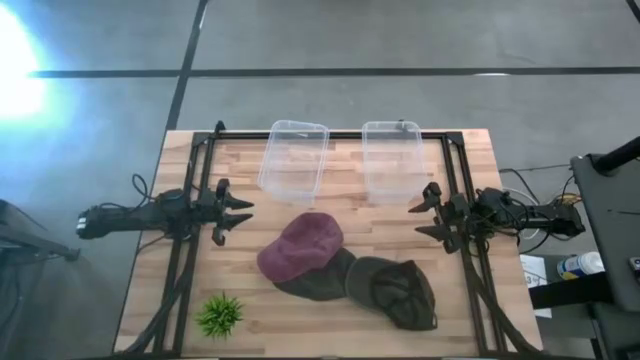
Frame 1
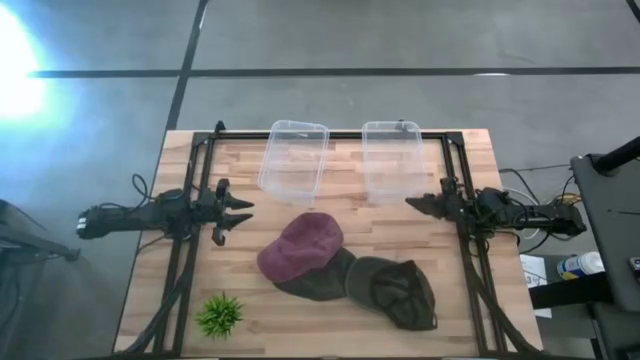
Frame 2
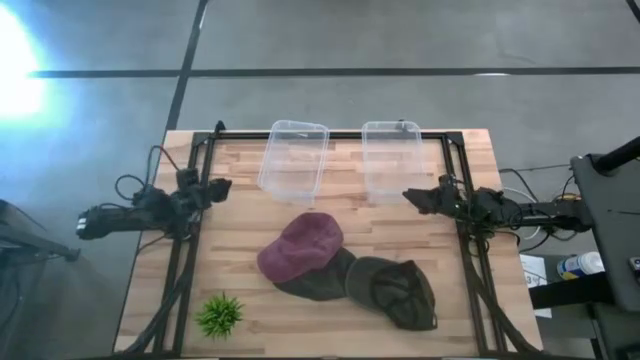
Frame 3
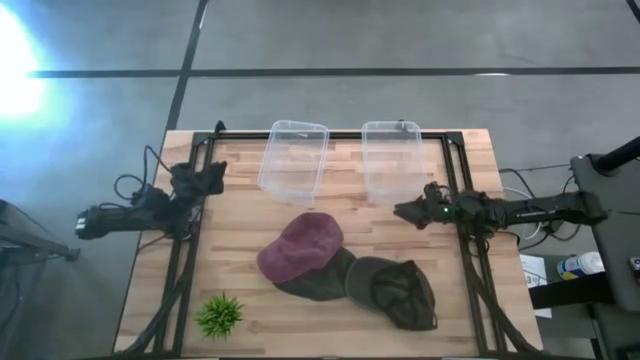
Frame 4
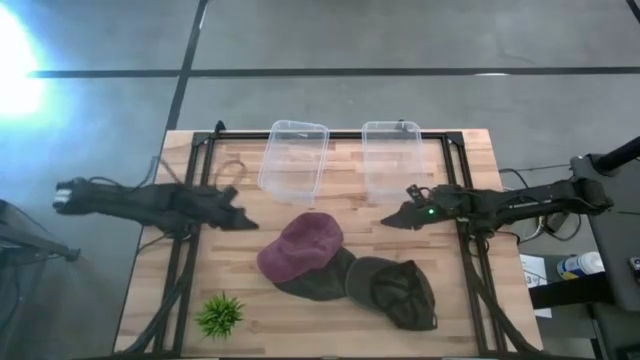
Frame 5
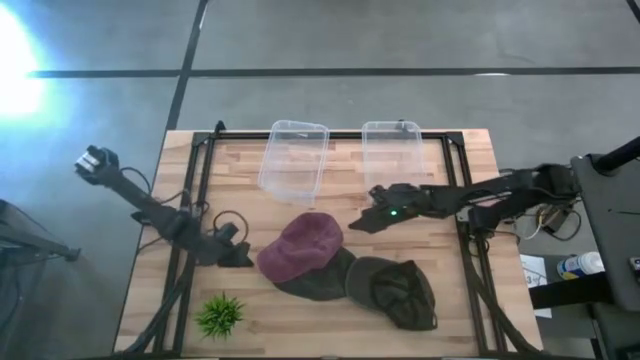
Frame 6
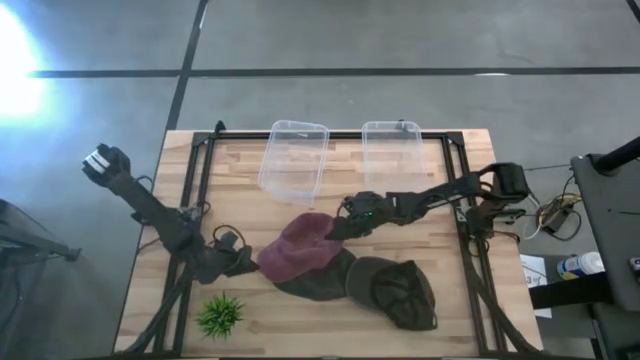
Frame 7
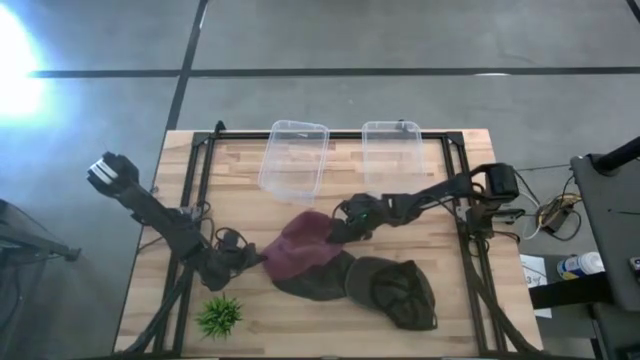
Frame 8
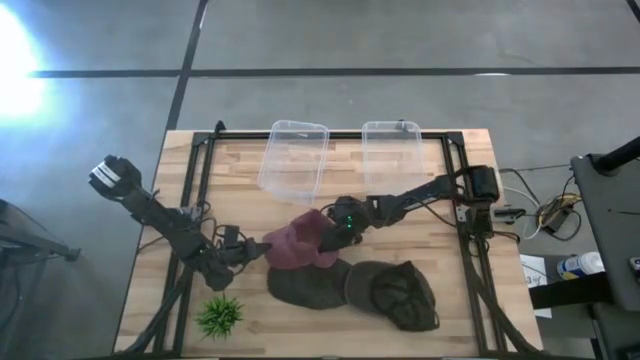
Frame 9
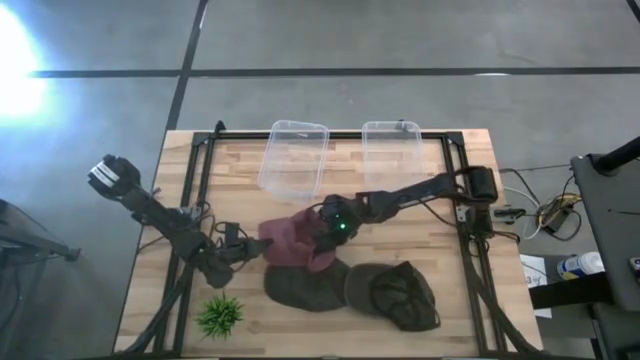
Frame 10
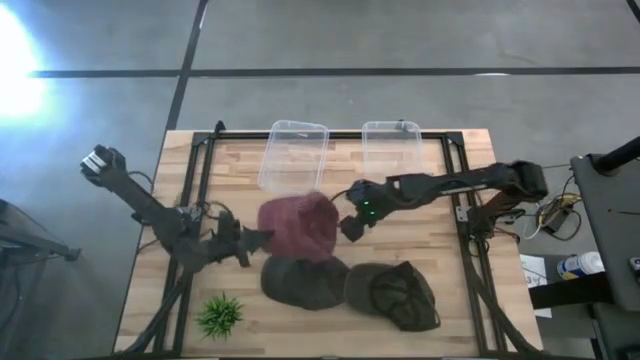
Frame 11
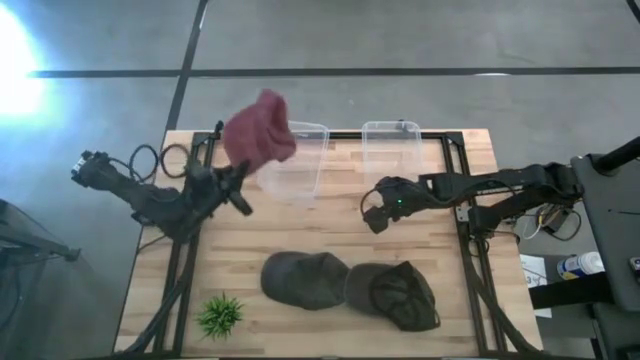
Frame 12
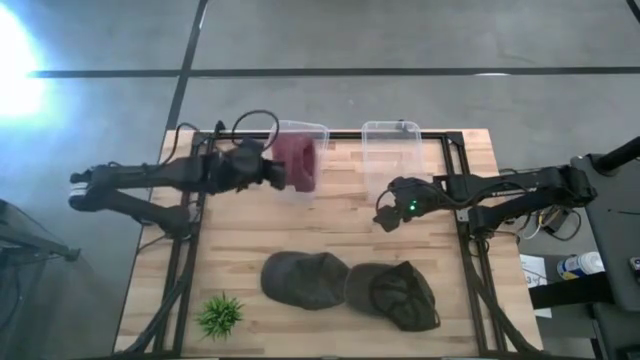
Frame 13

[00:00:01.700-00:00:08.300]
Task: Pick & Place hat
Put the red cap into the left transparent bin

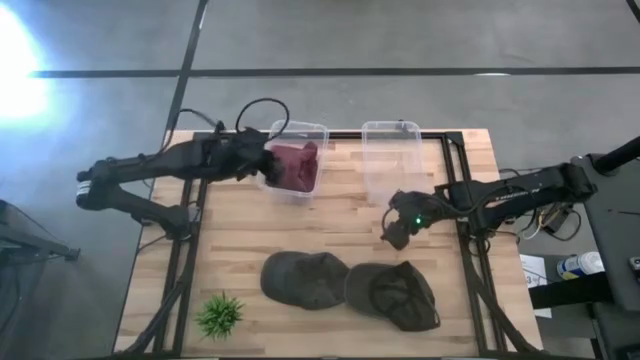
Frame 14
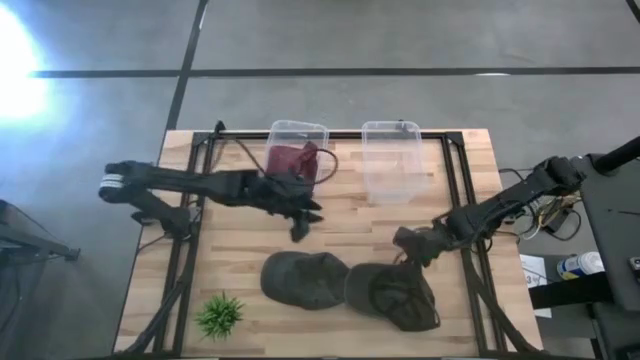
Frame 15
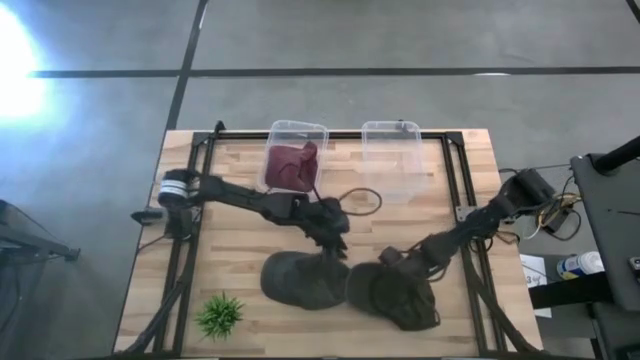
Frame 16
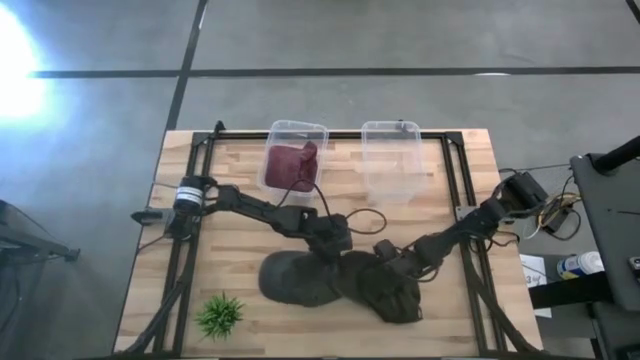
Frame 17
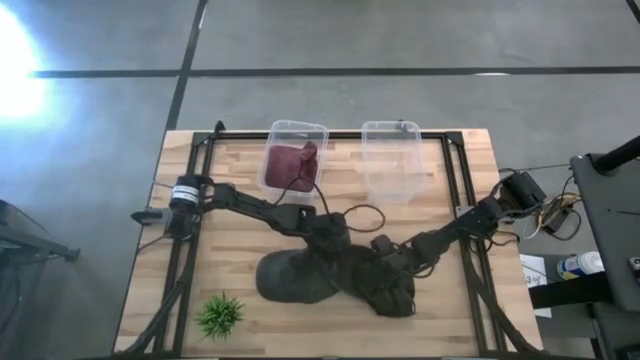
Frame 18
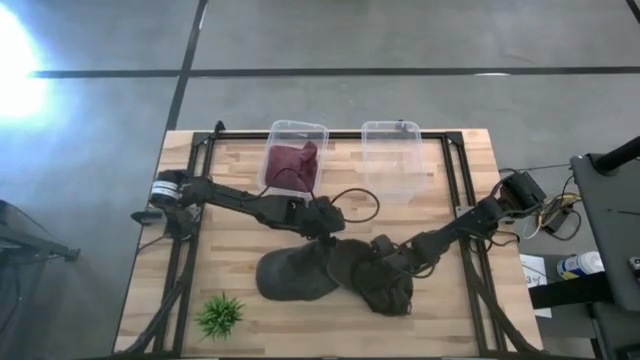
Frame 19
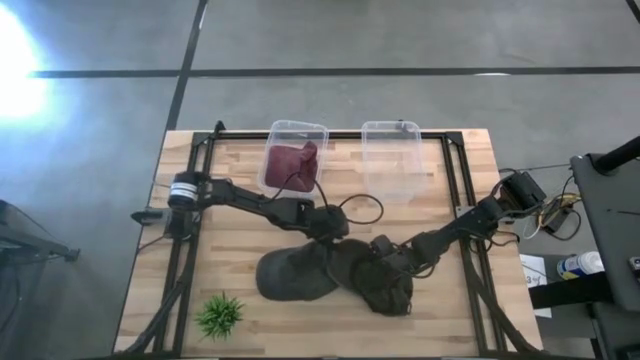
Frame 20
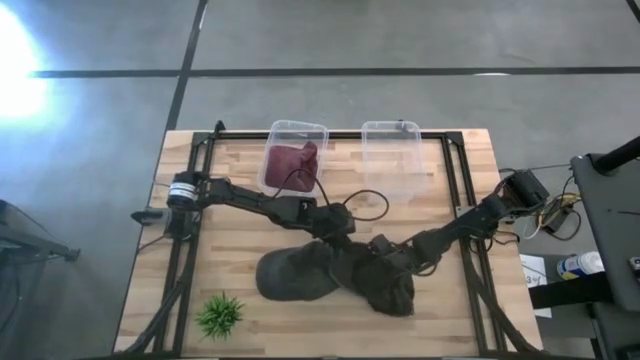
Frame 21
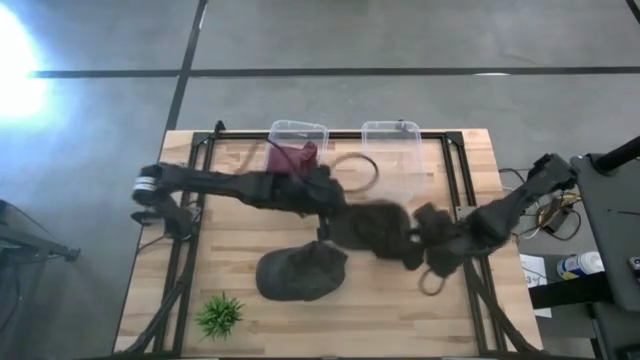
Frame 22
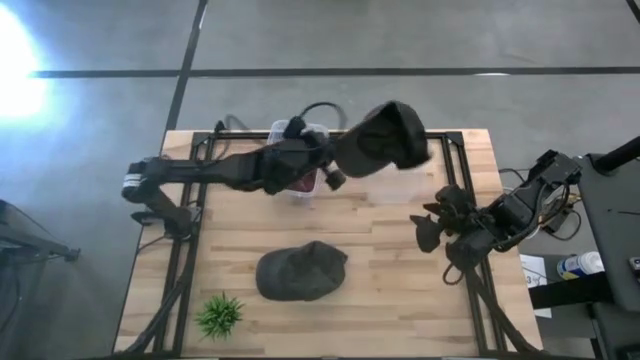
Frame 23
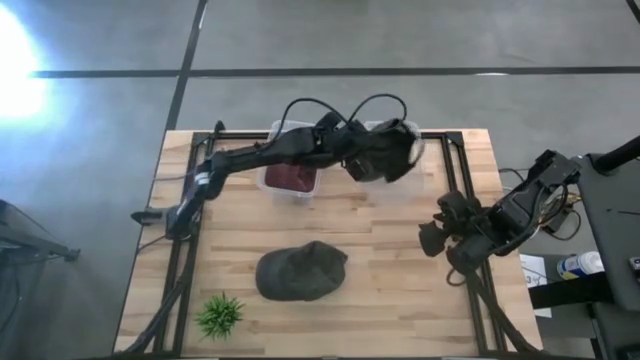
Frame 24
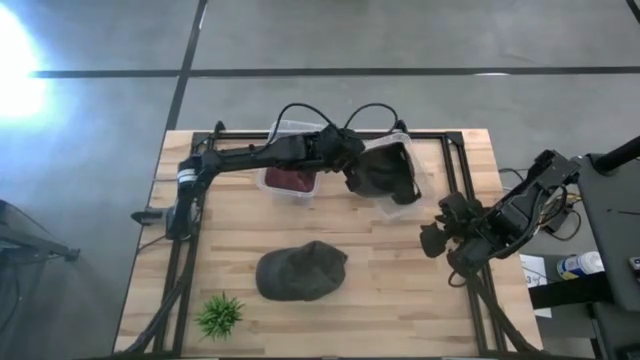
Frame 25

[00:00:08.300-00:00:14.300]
Put the black cap into the right transparent bin

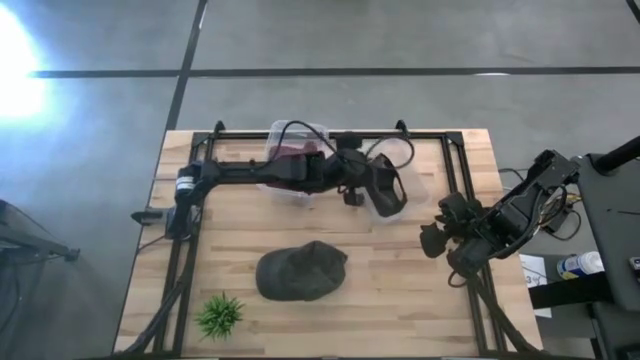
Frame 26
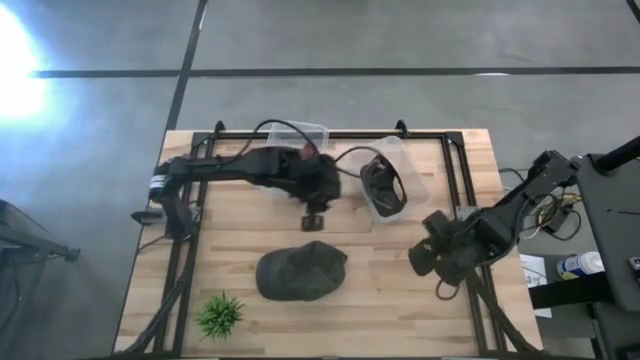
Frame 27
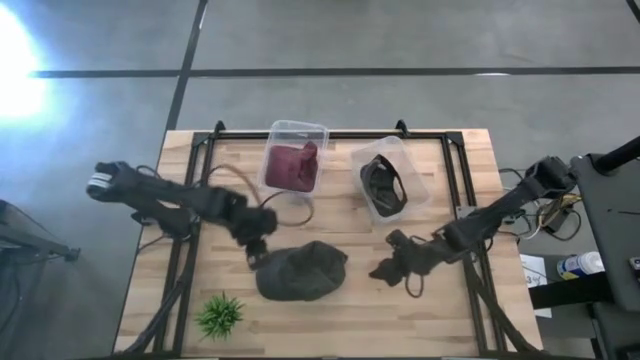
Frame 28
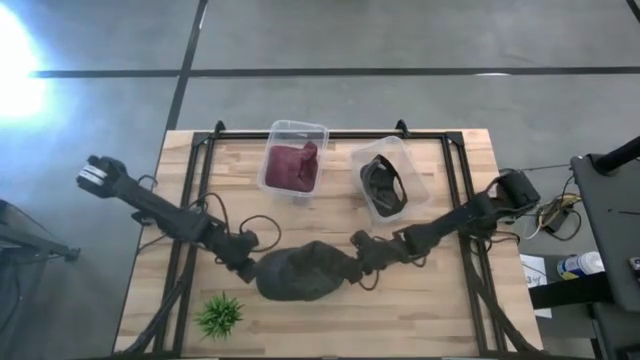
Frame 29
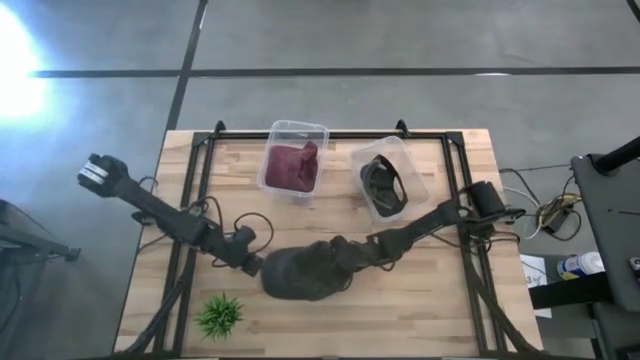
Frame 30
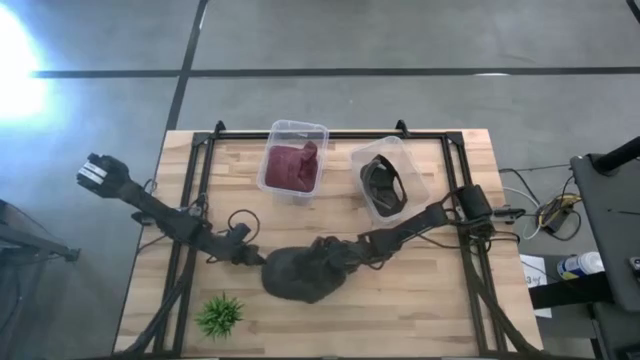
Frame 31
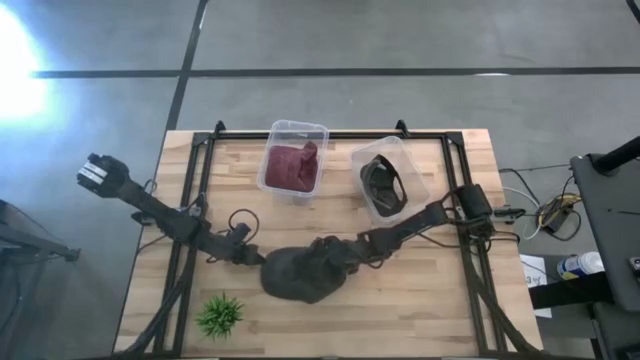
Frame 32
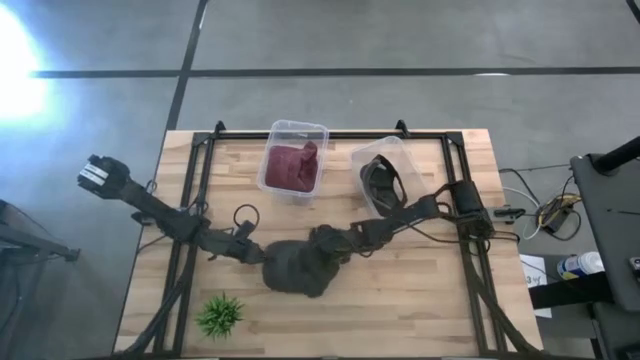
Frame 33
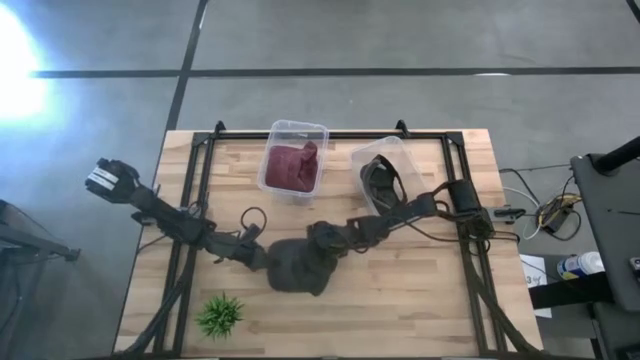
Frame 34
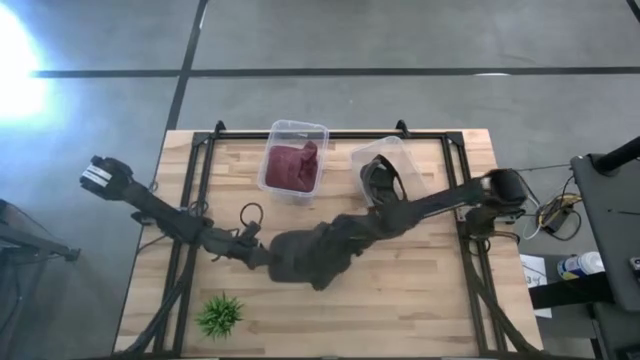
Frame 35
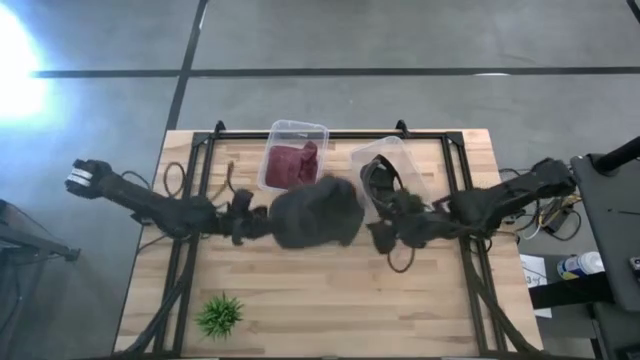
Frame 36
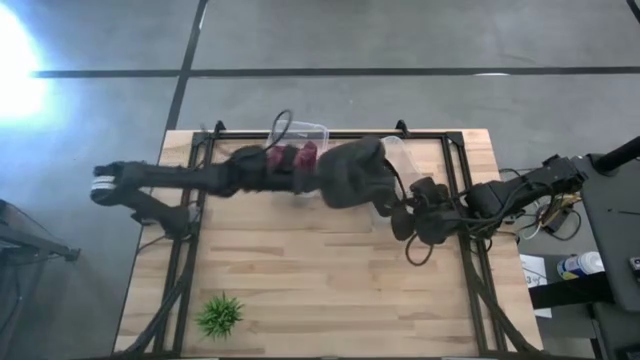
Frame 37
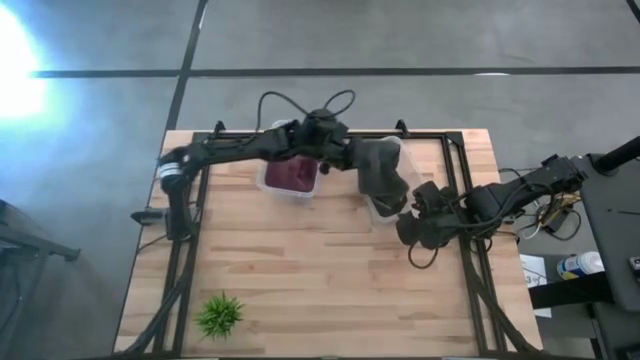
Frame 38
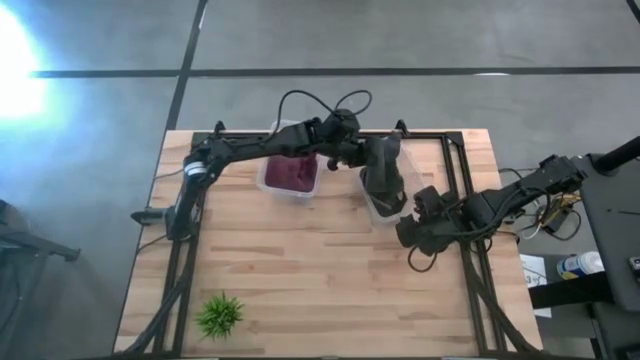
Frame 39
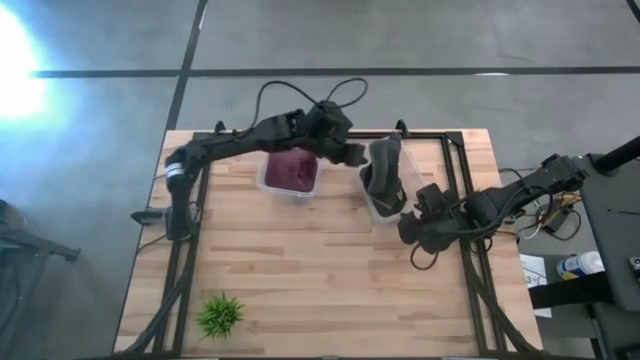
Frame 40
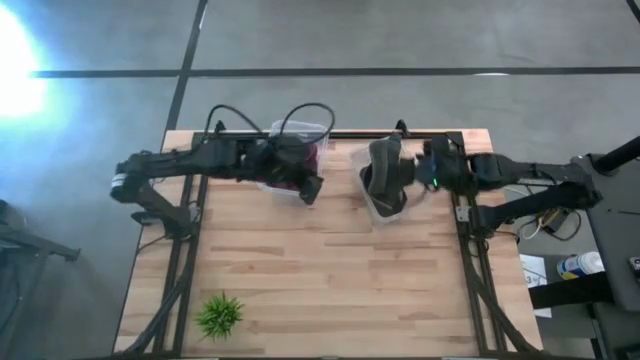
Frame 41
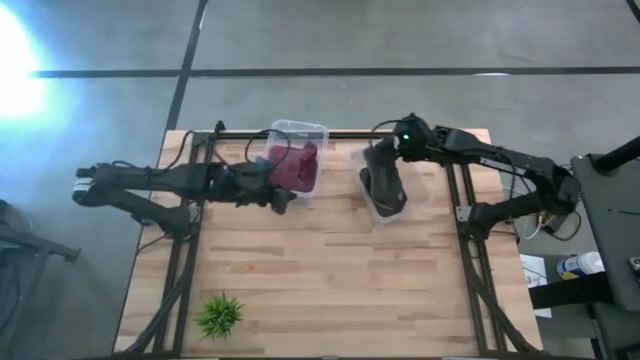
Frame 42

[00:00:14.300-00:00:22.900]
Put the black cap into the right transparent bin
